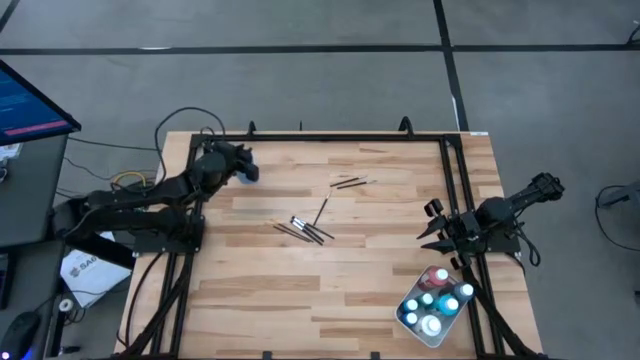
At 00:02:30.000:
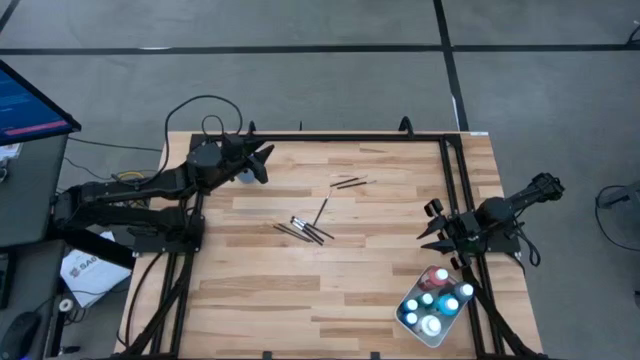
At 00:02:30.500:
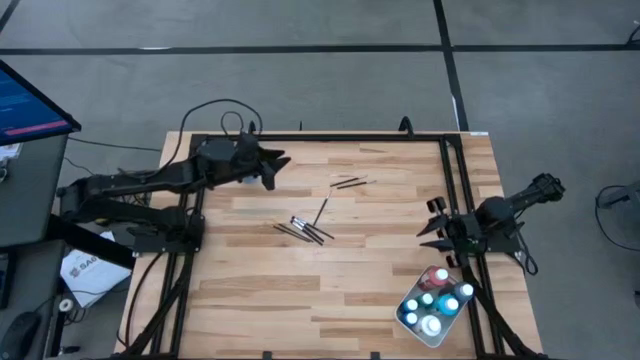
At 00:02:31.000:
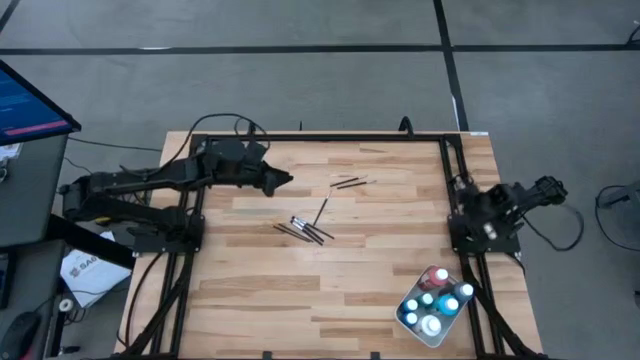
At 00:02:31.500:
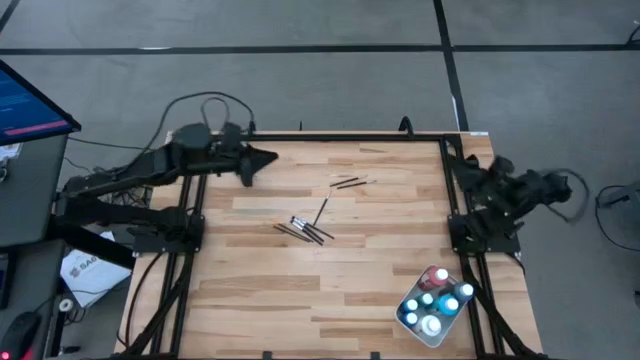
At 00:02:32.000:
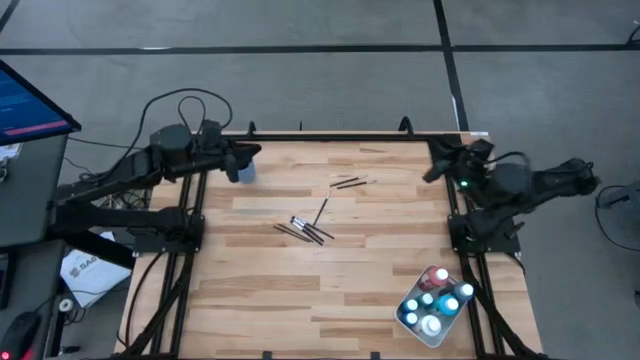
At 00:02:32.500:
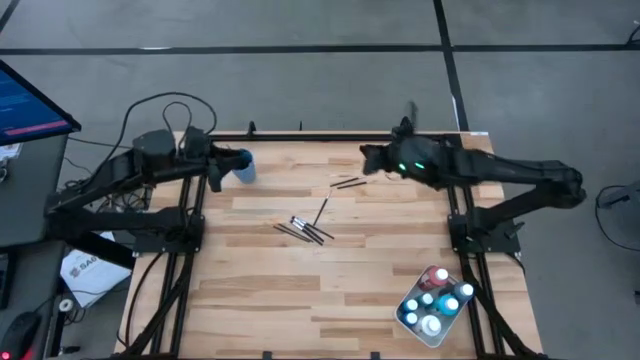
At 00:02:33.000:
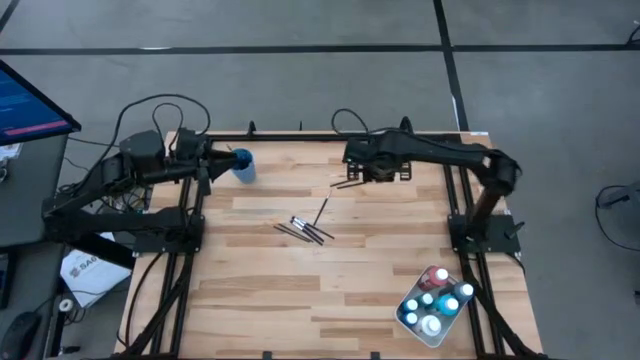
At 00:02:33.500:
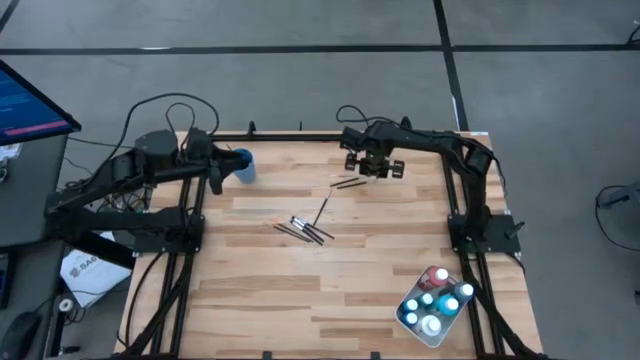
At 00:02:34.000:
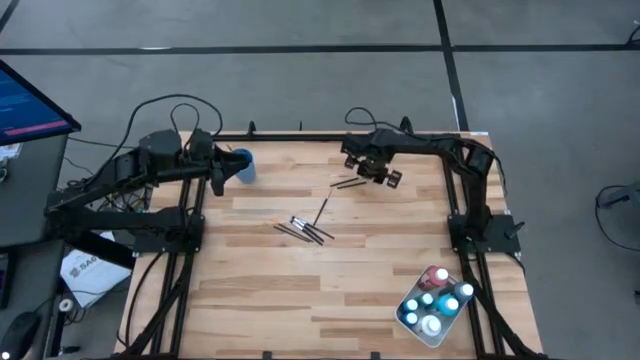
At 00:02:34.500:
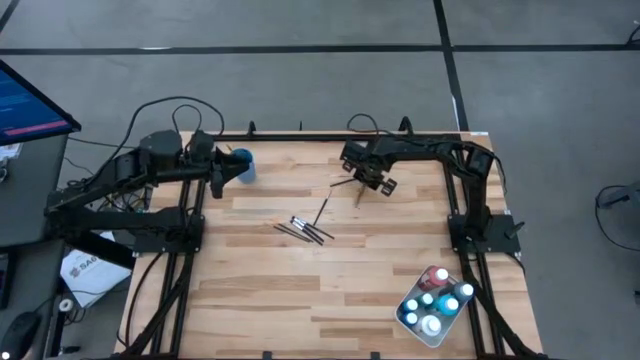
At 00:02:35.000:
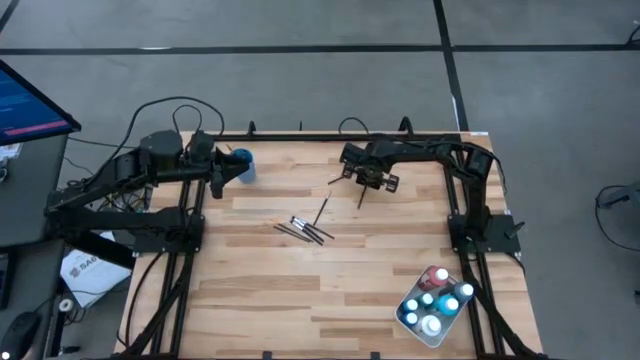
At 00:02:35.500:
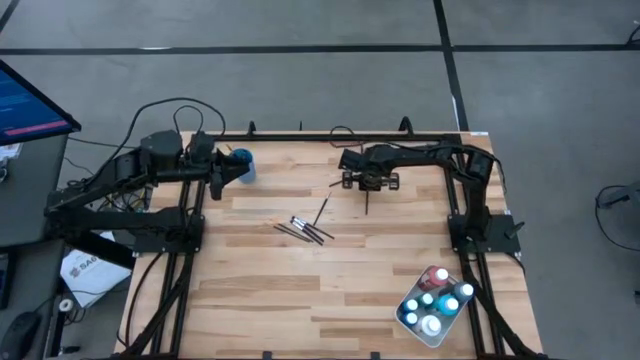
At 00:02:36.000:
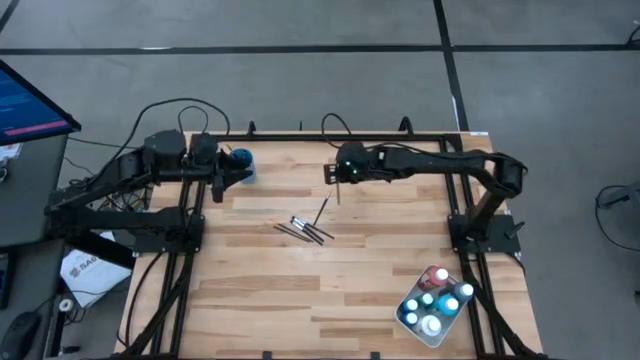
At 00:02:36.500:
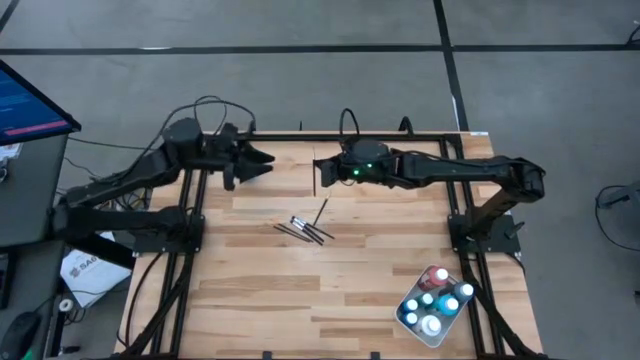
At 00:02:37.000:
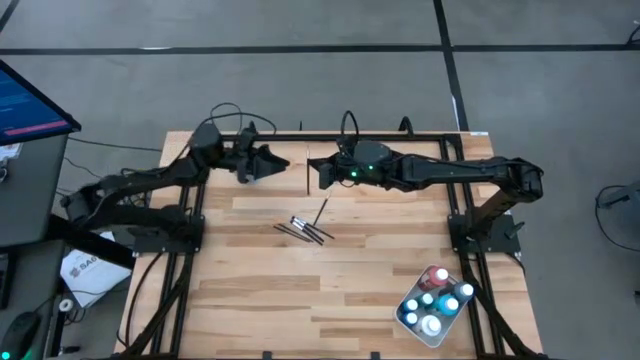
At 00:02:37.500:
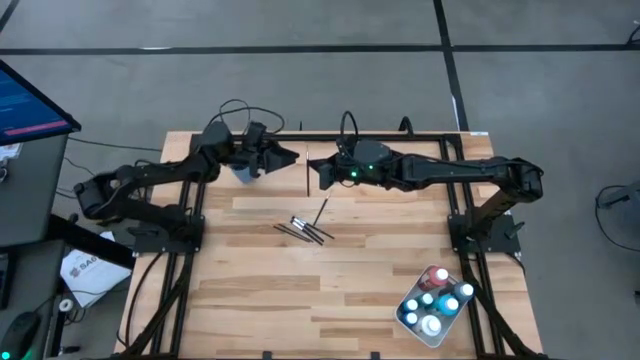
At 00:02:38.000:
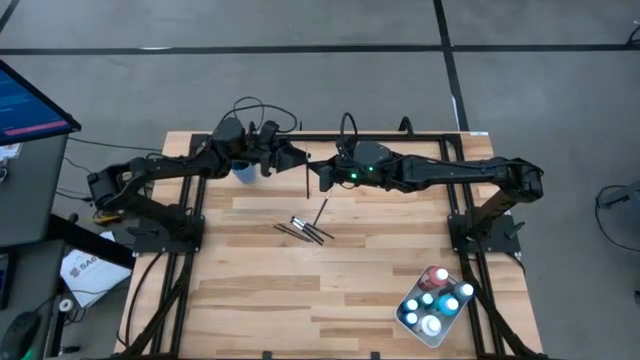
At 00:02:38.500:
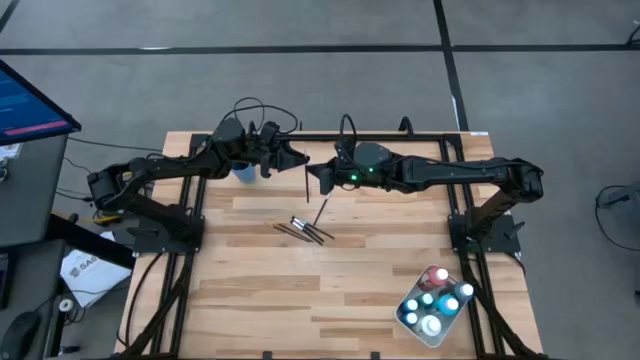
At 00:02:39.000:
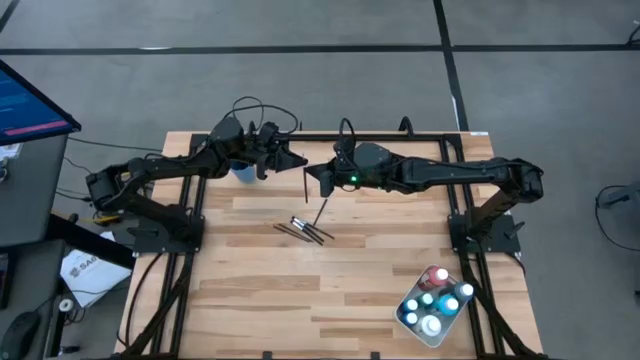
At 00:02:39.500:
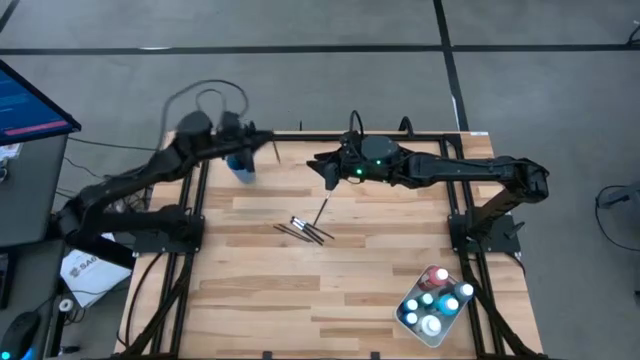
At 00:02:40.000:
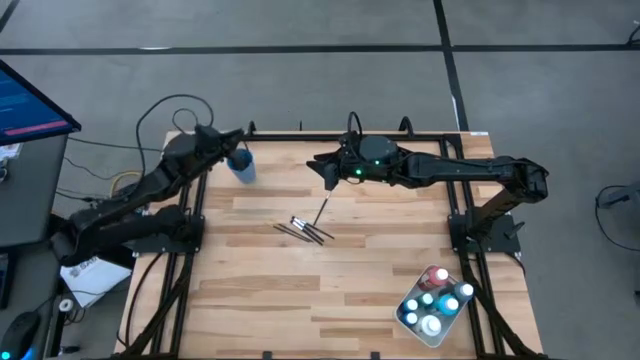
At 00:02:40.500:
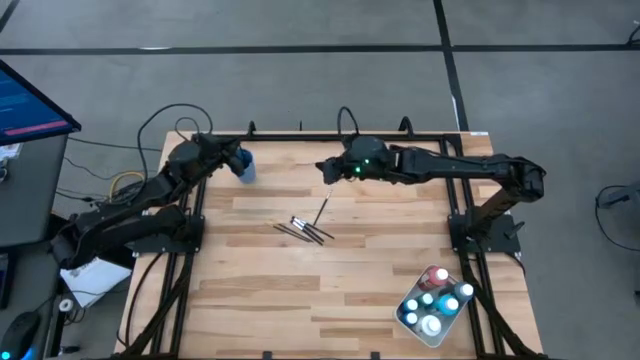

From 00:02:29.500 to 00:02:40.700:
Task: Pick & Place Paint Supplies
Put the silver paint brush into the blue cup

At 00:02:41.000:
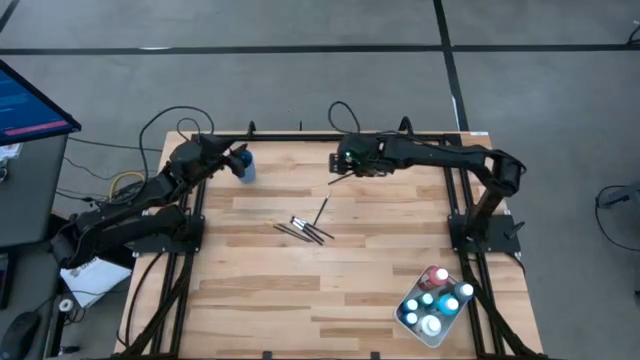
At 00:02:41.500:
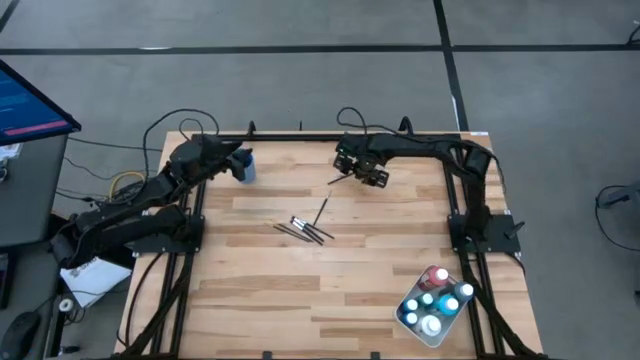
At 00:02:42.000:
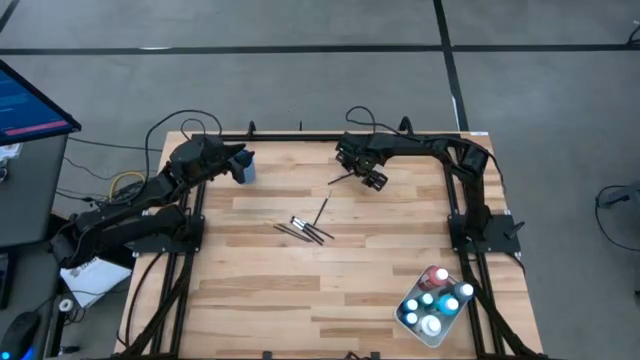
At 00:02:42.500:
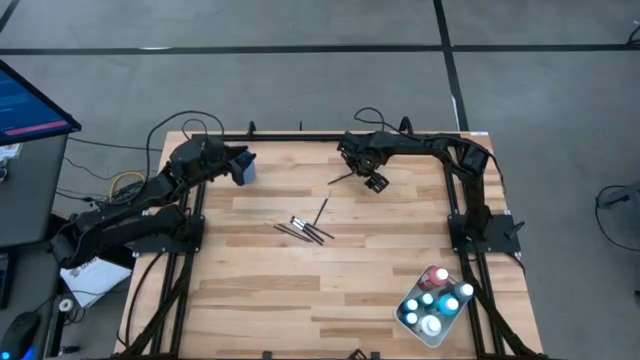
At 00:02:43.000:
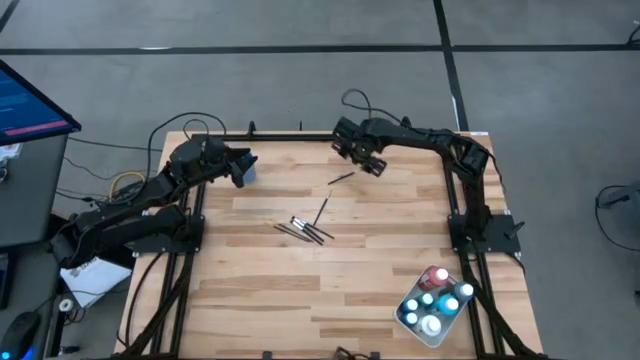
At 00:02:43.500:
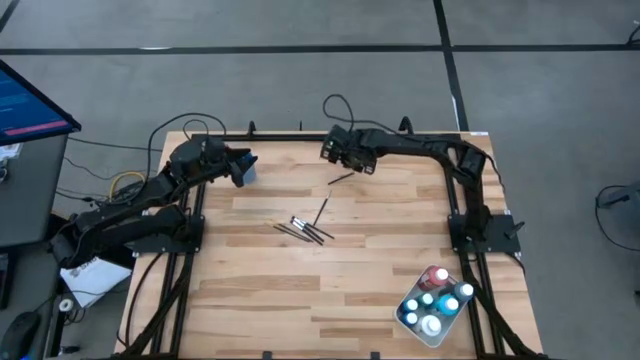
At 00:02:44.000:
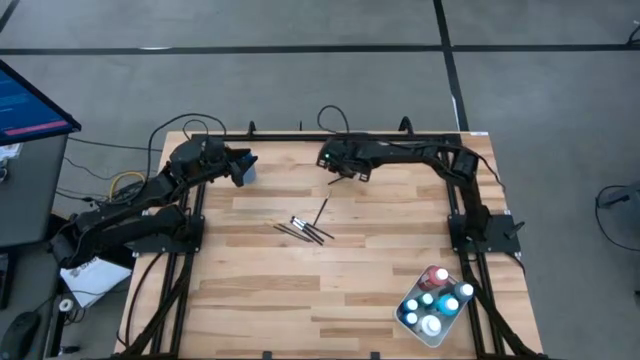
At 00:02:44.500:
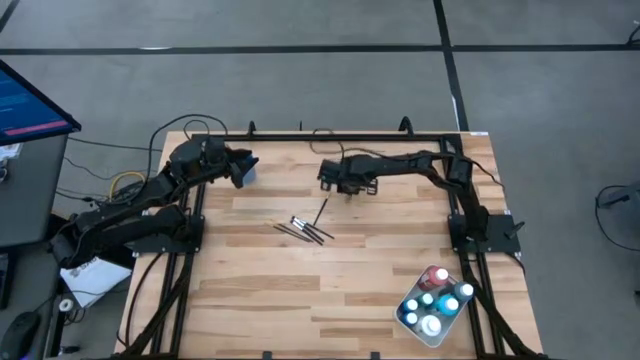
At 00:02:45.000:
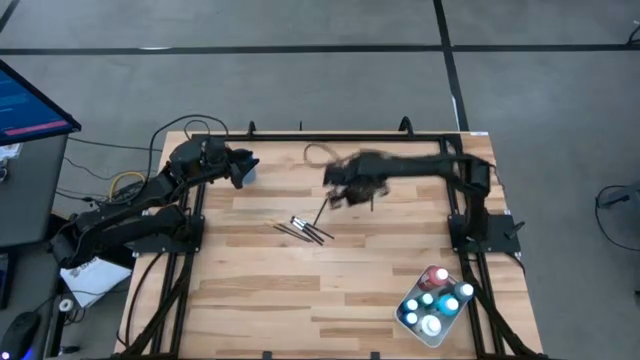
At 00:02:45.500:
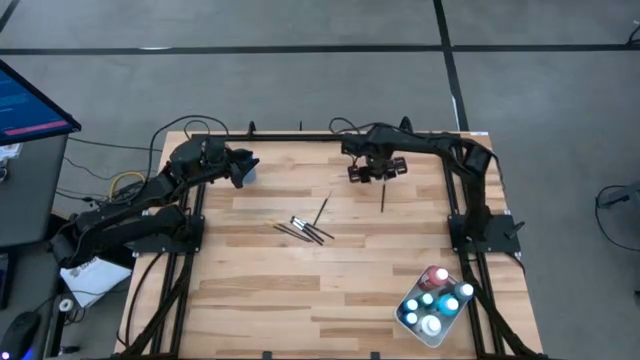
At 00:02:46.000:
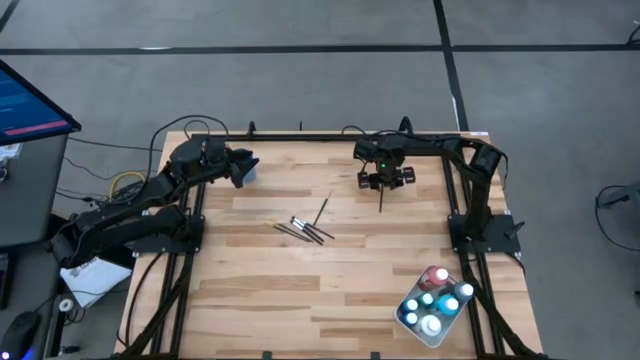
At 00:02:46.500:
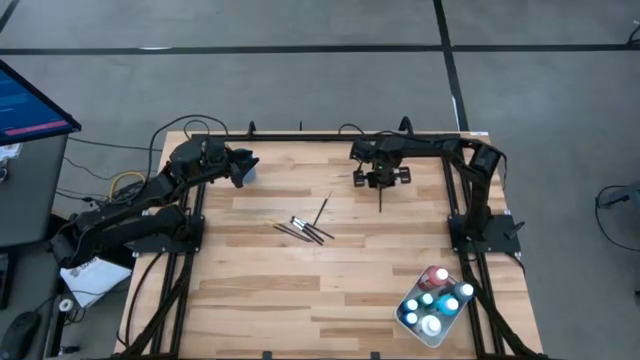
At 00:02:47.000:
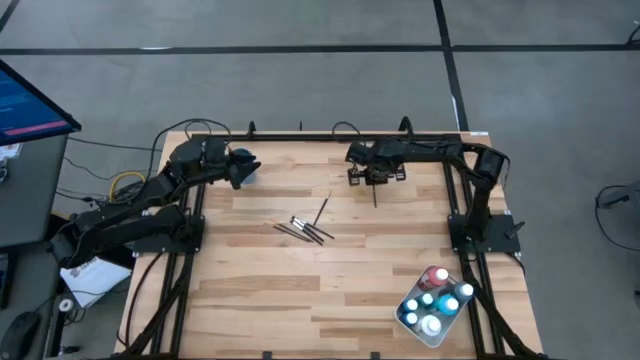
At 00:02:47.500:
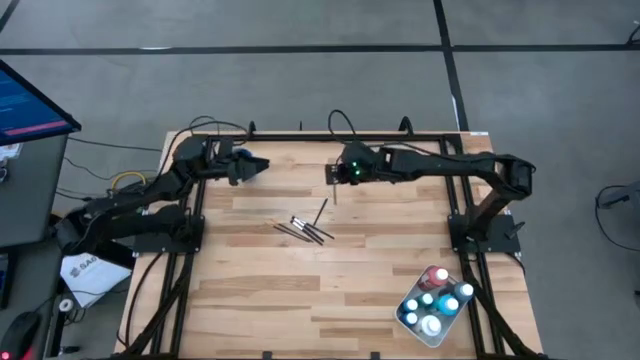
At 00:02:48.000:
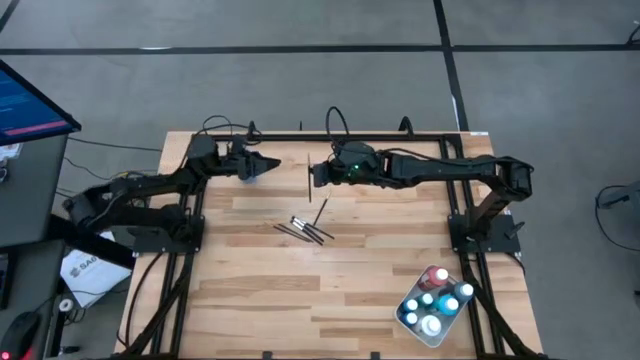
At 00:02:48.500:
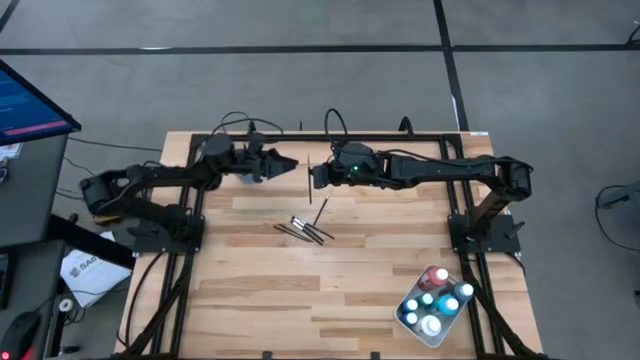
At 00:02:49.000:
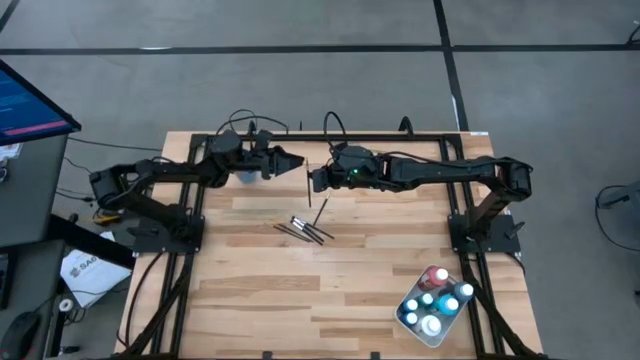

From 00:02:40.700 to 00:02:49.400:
Put the silver paint brush into the blue cup
